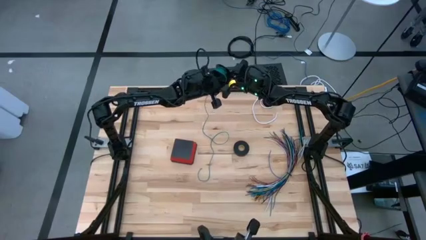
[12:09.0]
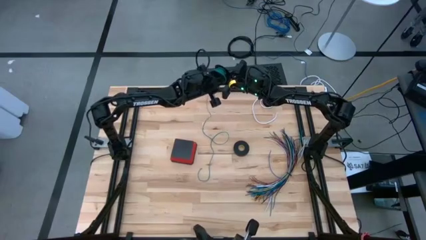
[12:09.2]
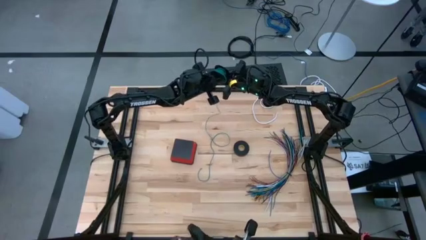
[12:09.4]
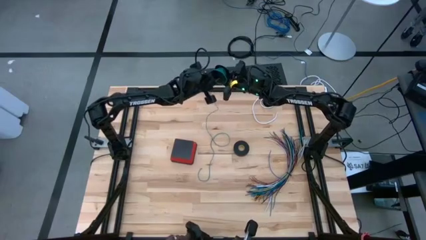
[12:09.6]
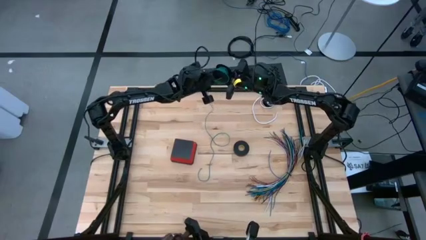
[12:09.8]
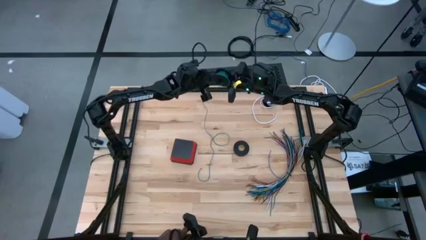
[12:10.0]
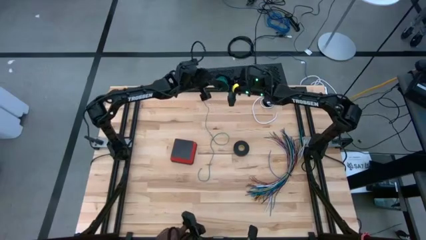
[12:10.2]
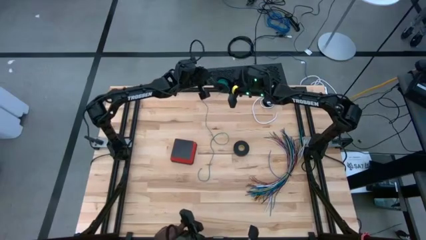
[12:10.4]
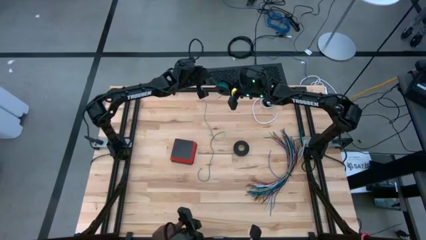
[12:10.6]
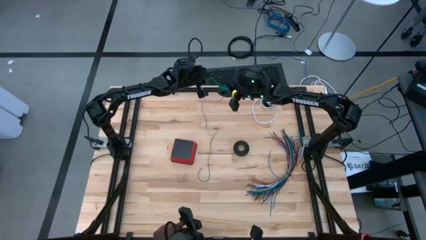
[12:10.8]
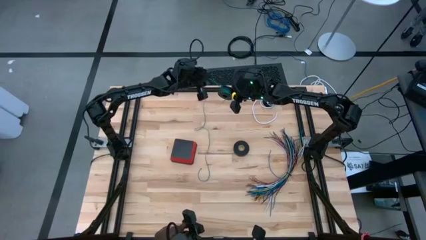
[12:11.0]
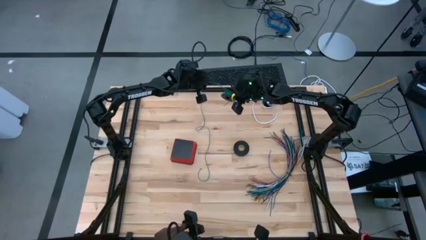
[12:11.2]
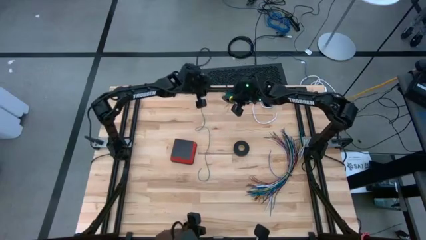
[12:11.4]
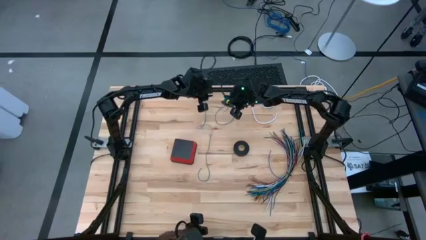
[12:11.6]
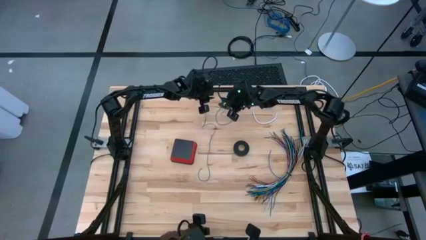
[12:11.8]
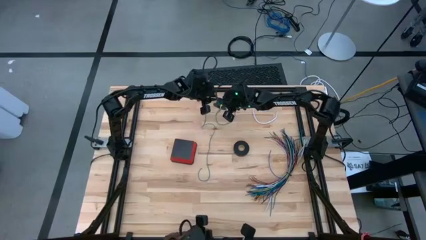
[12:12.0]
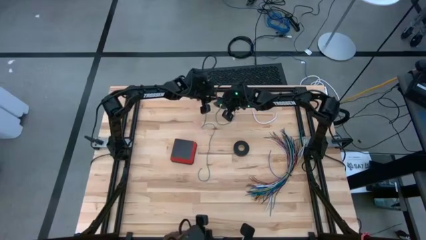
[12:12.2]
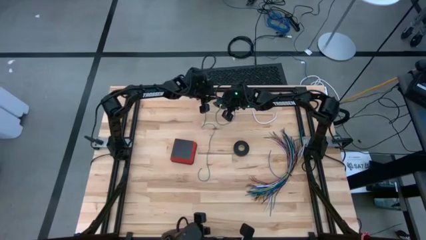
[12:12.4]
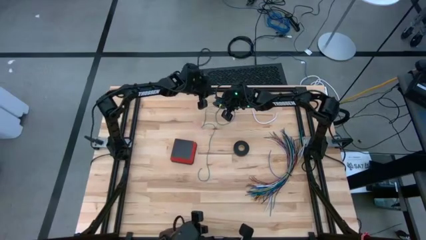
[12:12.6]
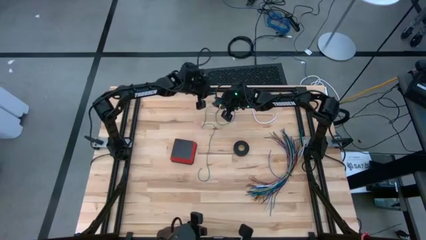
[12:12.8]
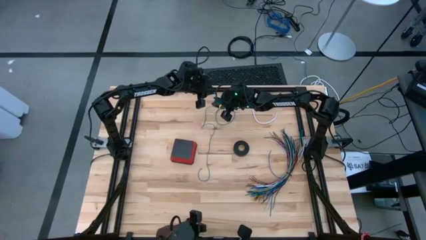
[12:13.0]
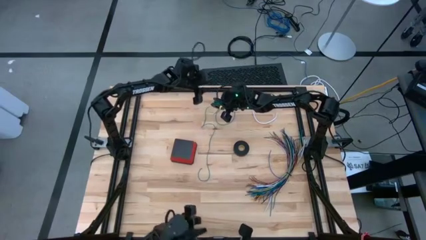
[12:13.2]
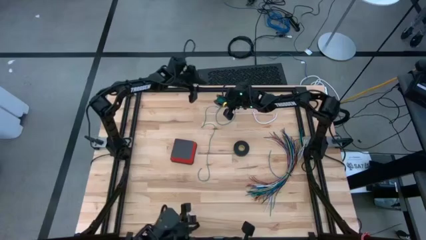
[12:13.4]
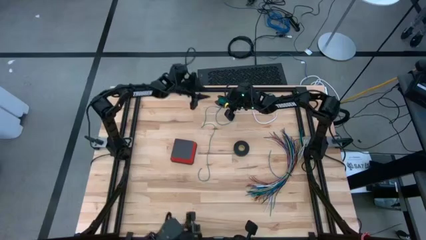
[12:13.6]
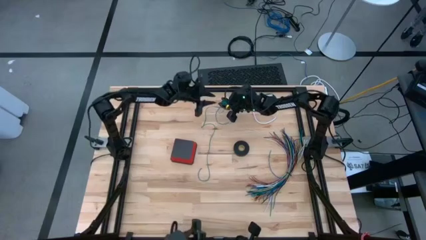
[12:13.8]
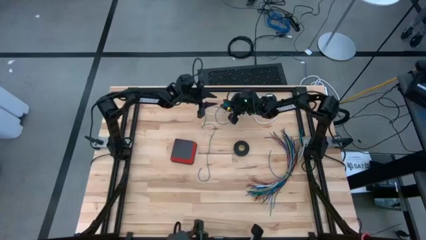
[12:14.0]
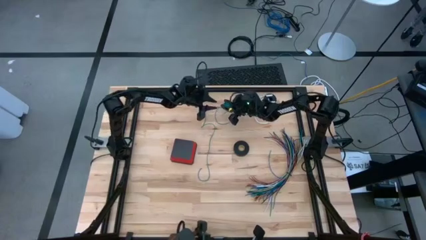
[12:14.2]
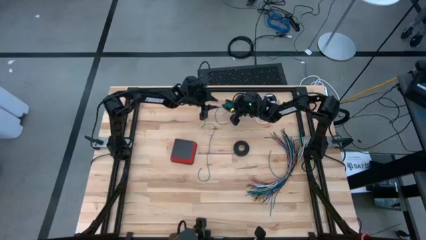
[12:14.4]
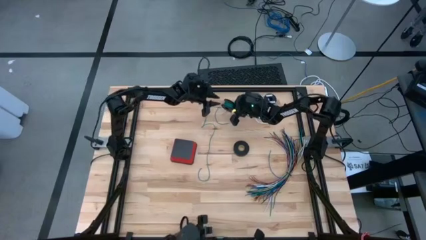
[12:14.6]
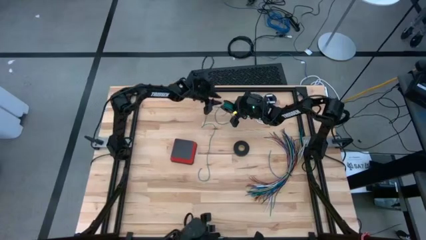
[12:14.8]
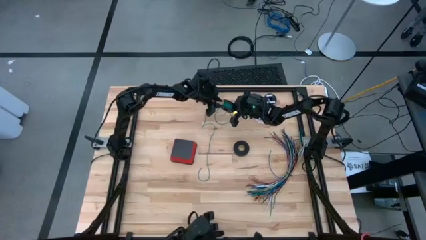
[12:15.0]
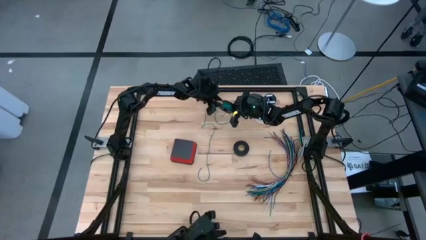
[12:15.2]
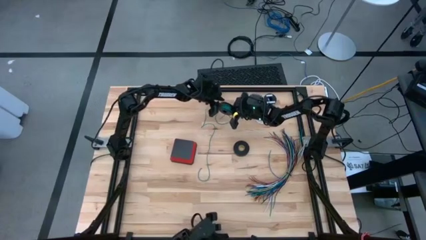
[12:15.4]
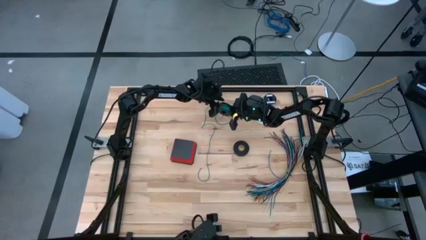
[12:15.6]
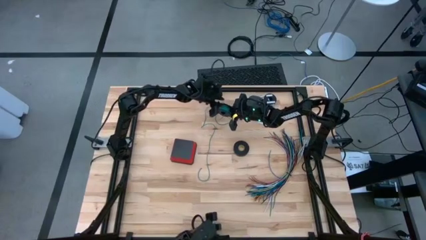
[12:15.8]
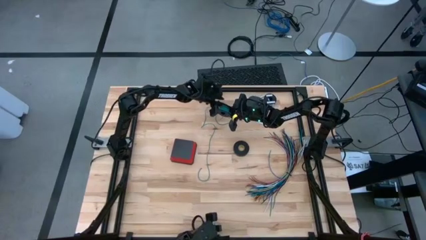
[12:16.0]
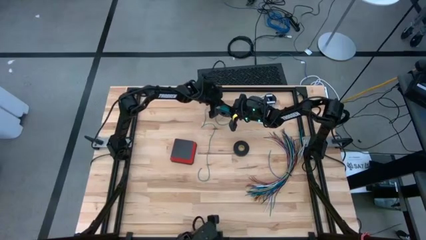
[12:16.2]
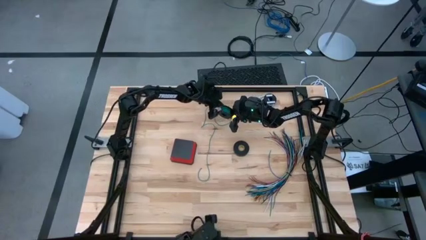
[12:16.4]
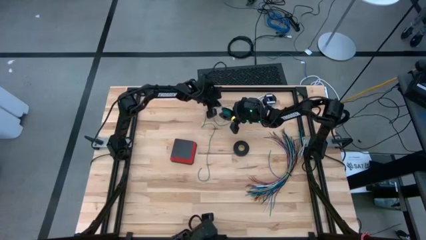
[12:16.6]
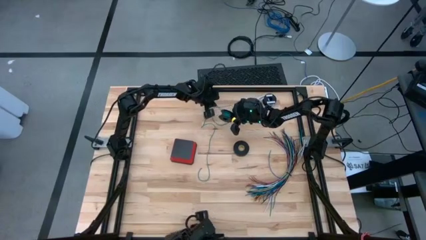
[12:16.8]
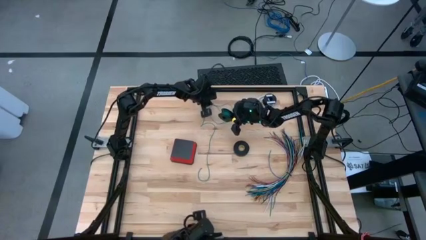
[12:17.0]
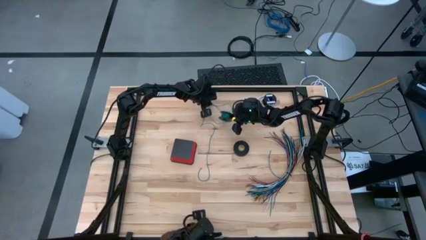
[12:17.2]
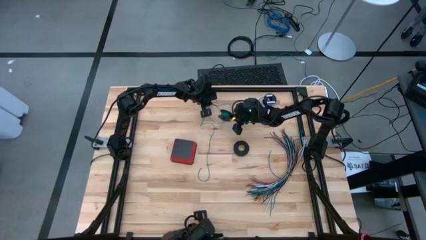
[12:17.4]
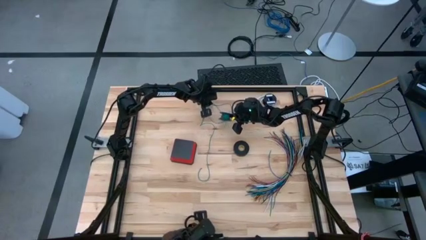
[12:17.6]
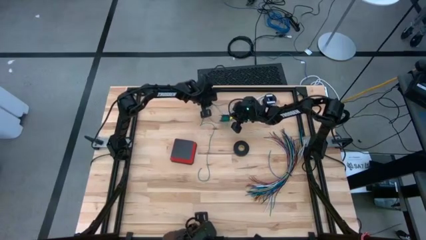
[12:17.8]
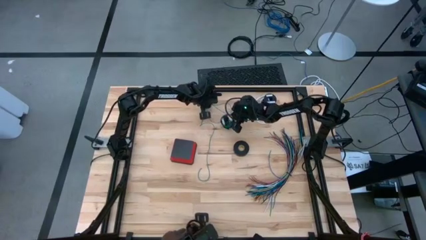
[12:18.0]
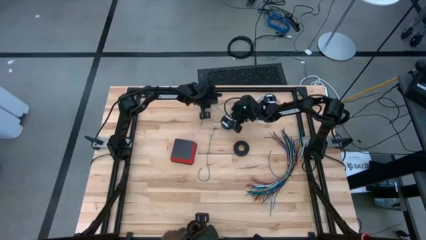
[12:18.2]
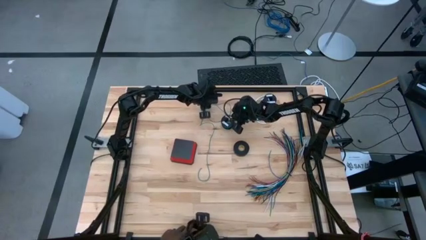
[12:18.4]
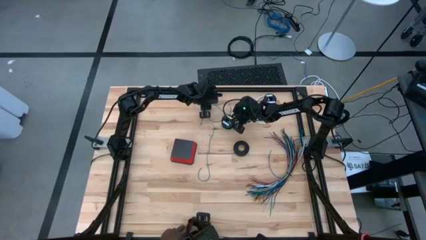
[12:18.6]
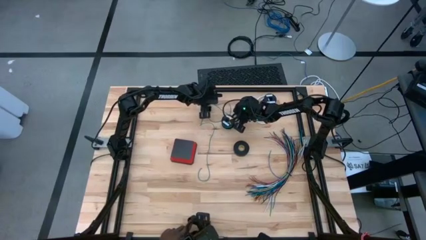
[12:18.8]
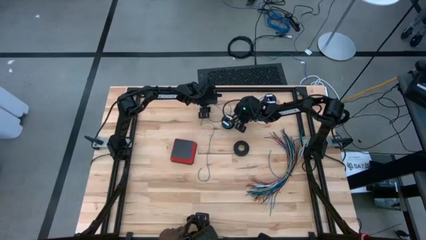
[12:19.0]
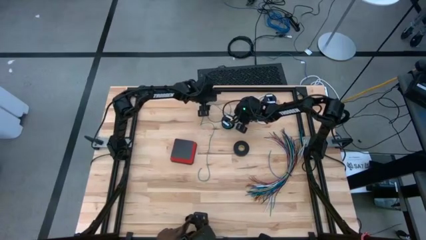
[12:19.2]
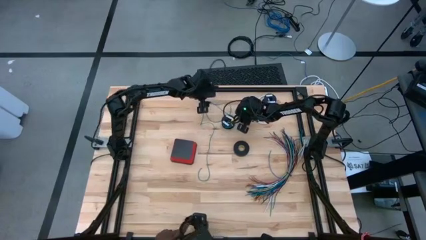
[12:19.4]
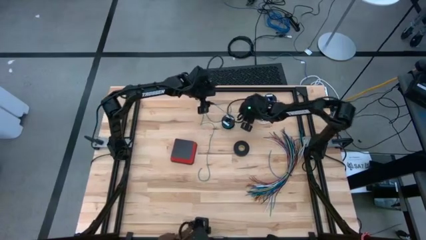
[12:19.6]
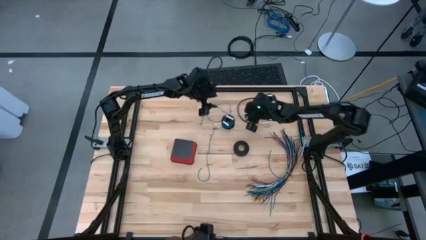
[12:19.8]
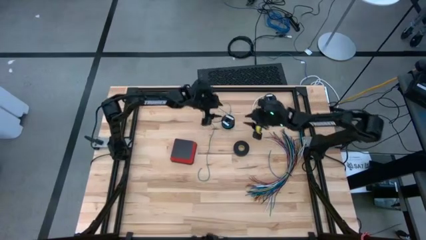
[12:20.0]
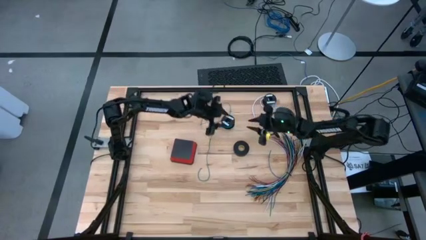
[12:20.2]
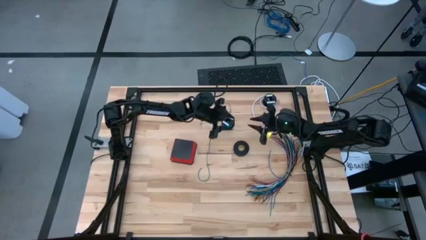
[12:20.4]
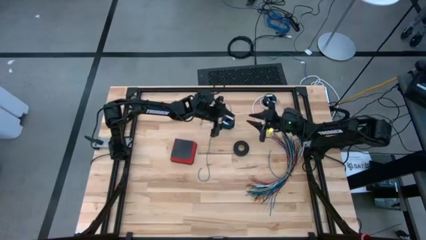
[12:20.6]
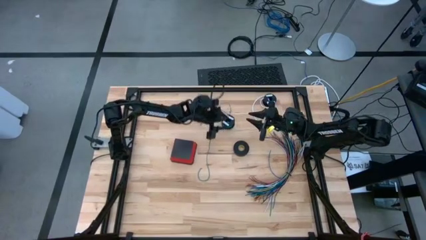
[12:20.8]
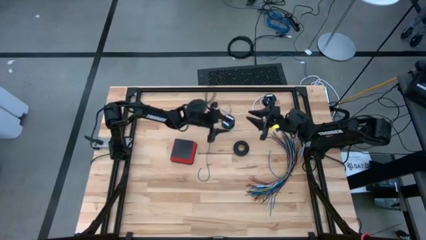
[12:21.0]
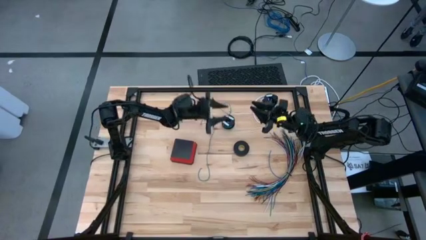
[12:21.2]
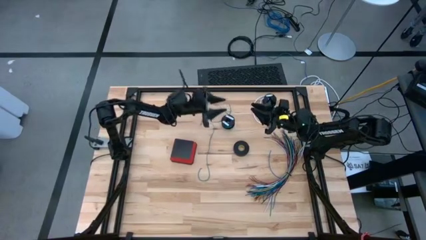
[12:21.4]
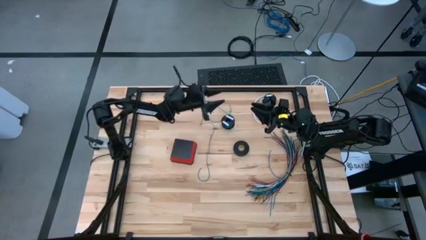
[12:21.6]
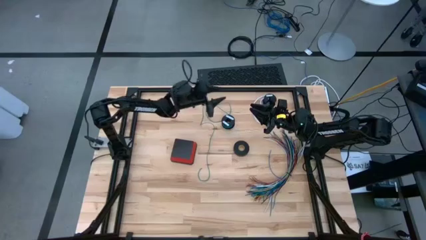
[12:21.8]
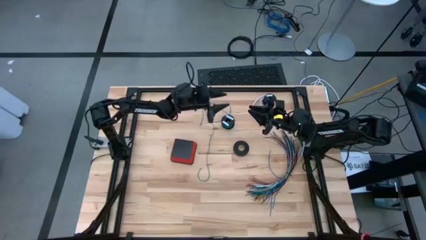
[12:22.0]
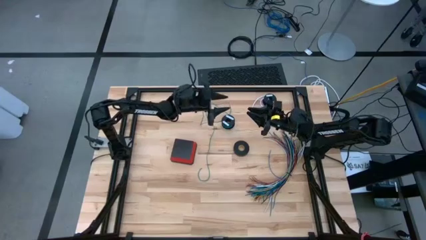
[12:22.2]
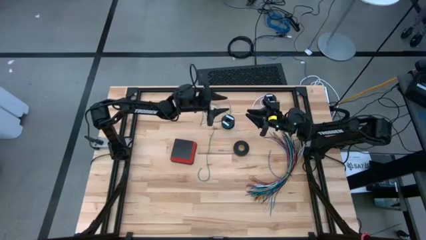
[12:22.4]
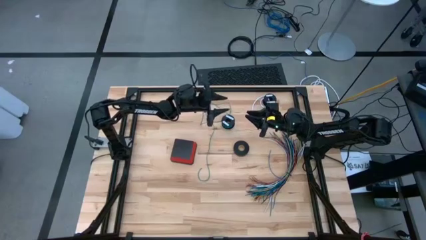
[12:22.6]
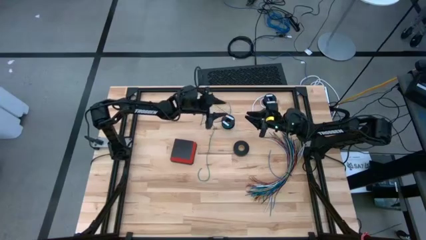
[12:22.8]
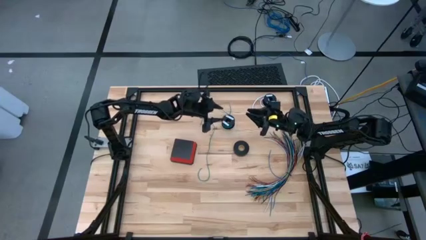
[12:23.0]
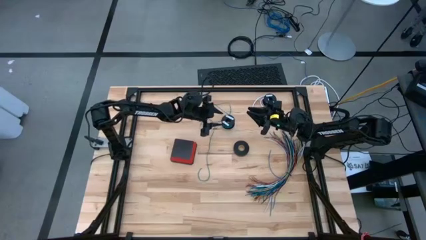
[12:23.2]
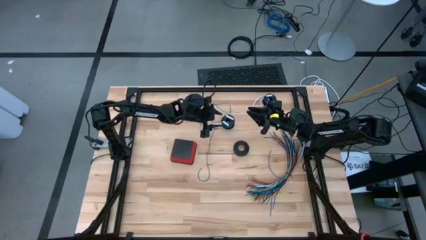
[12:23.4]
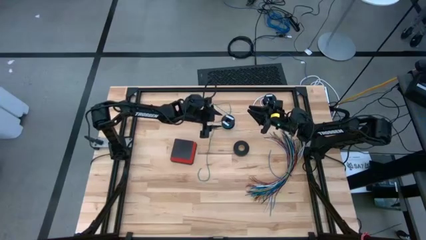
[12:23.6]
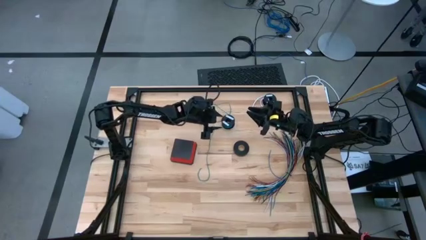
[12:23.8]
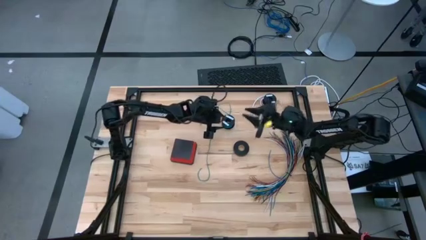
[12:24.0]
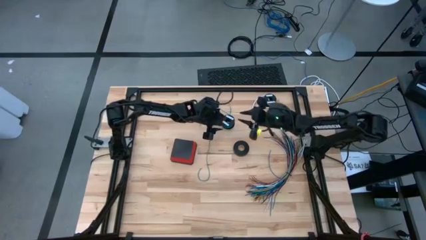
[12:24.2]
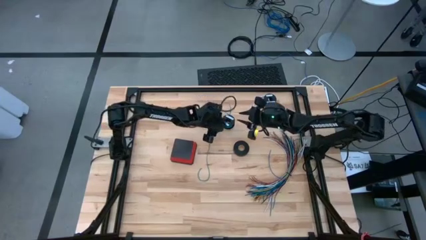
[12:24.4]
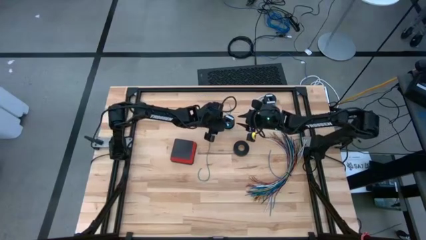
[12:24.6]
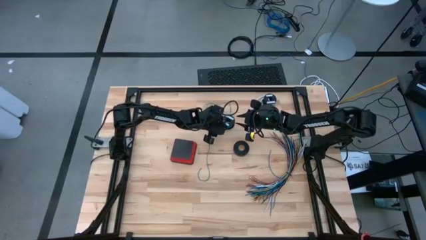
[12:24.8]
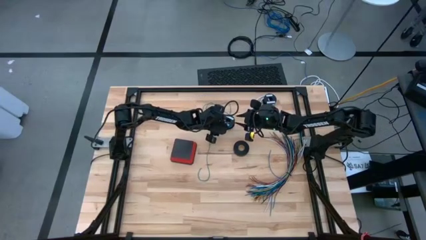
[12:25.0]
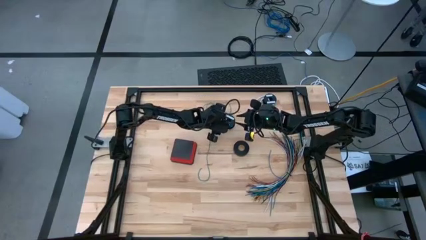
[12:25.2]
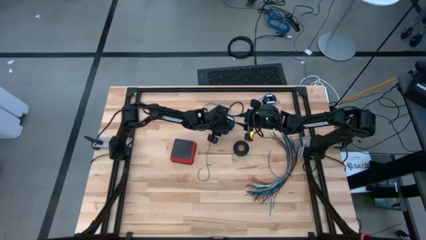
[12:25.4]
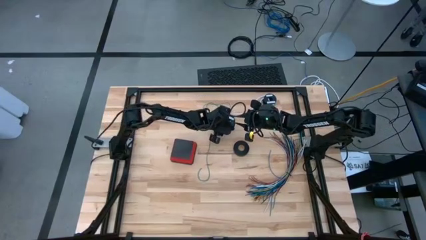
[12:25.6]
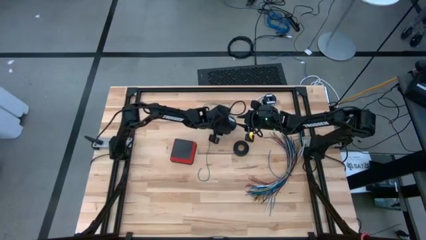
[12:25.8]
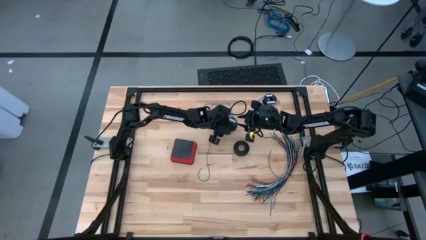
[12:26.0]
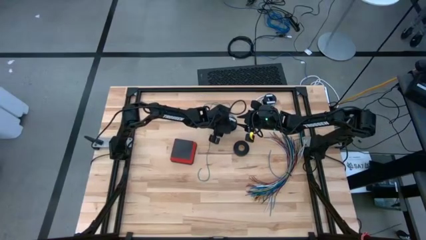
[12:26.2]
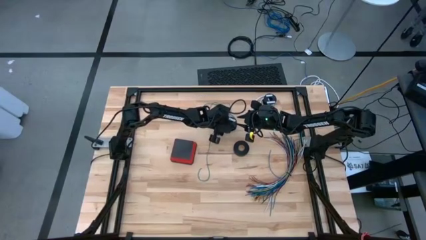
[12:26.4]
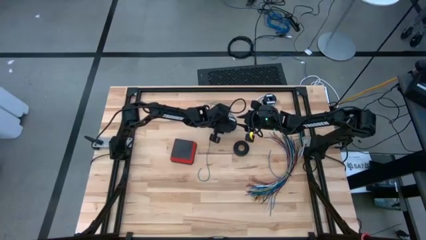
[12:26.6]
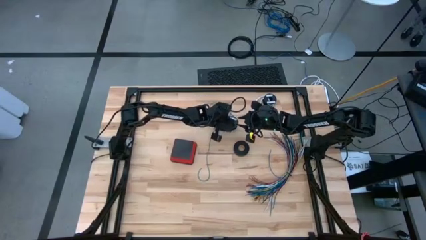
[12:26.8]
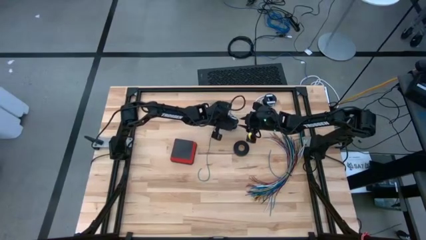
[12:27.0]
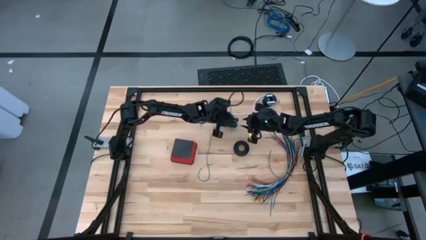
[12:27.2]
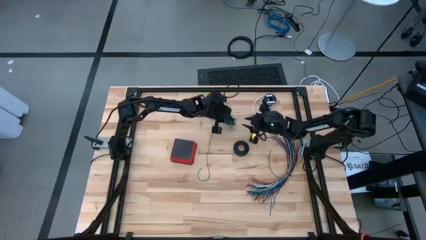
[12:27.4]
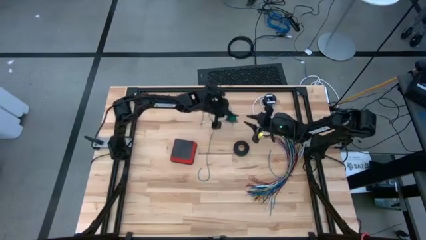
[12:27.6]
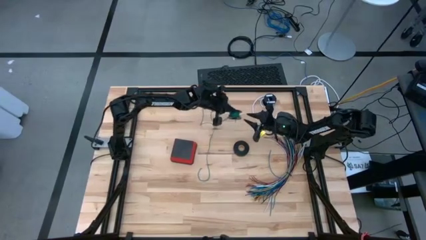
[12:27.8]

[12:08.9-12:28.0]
Task: Coiling cords
Coil the green wire cable on the spool
